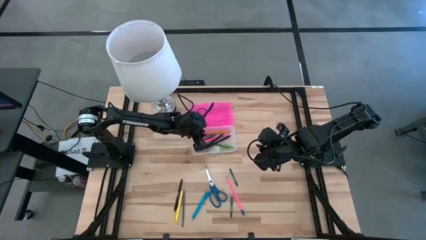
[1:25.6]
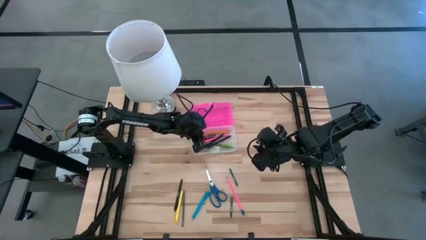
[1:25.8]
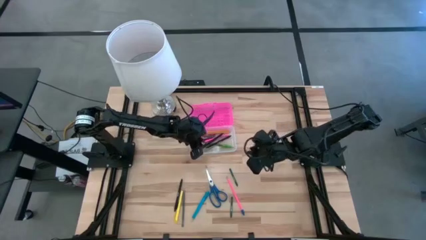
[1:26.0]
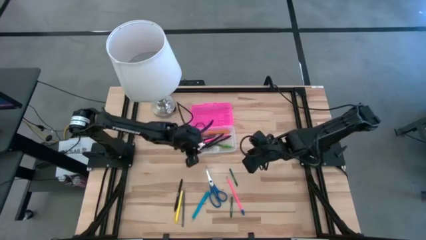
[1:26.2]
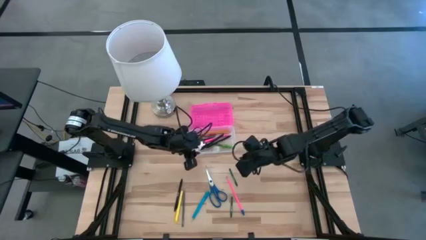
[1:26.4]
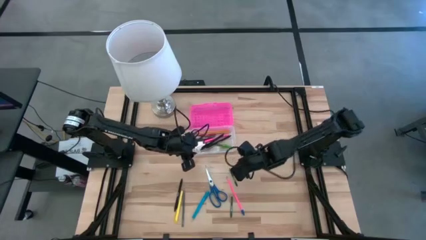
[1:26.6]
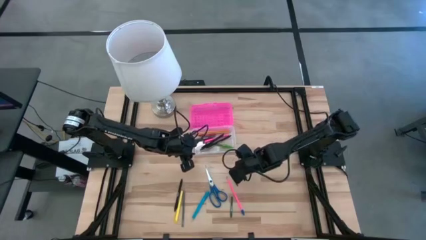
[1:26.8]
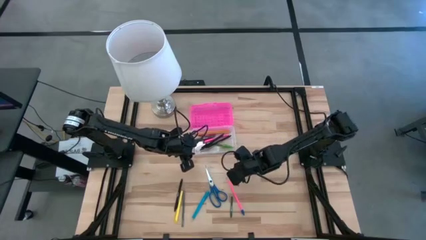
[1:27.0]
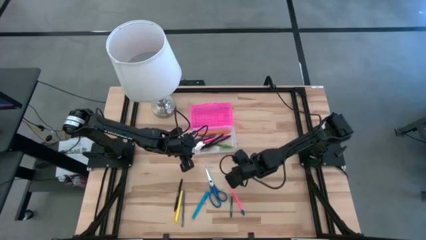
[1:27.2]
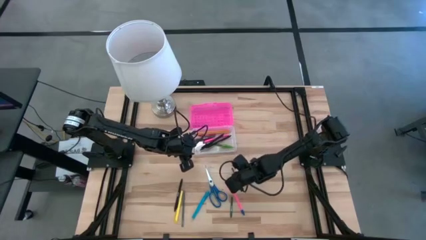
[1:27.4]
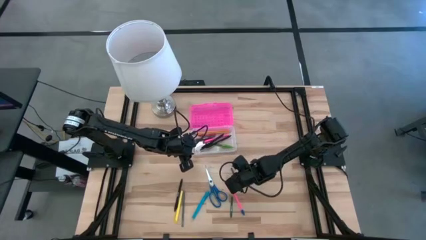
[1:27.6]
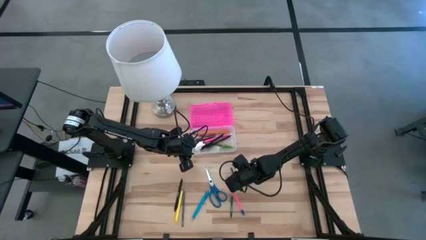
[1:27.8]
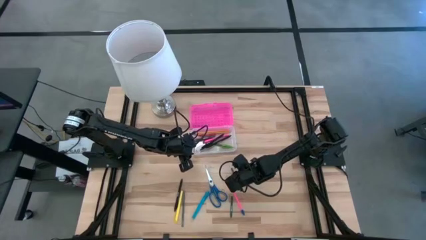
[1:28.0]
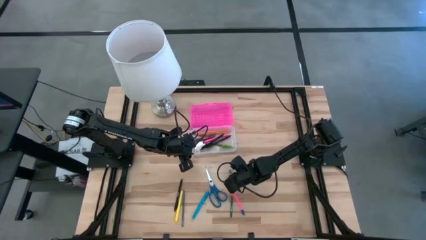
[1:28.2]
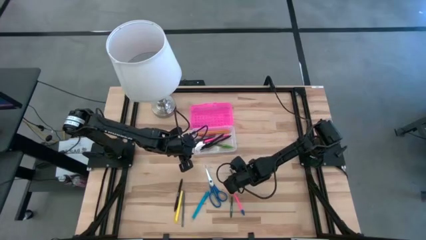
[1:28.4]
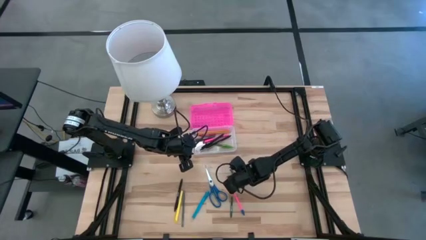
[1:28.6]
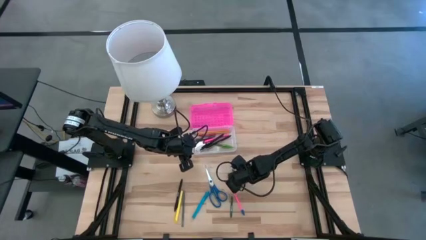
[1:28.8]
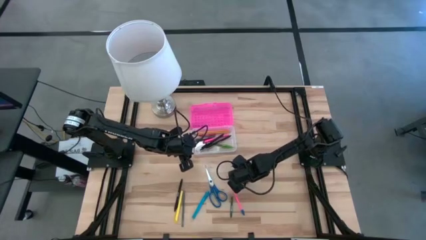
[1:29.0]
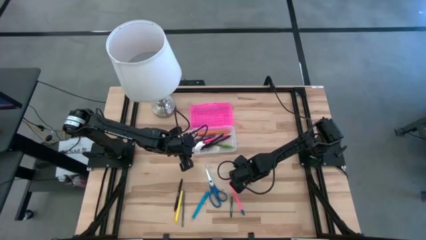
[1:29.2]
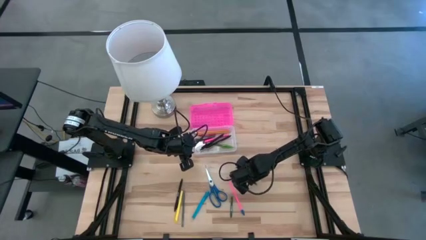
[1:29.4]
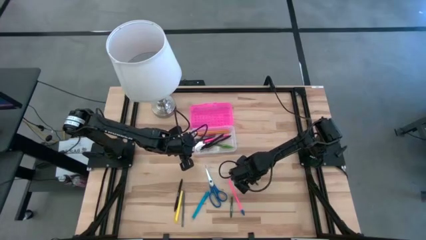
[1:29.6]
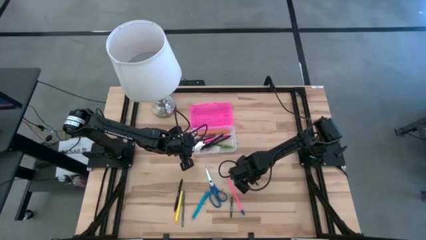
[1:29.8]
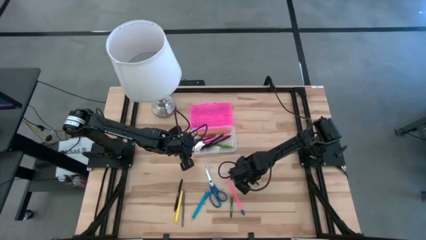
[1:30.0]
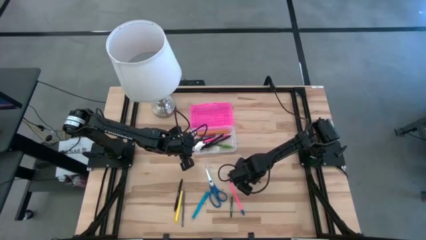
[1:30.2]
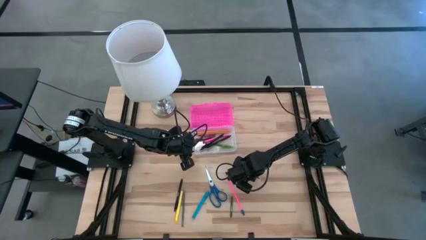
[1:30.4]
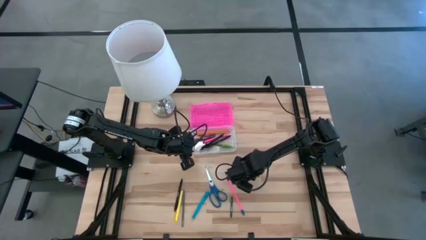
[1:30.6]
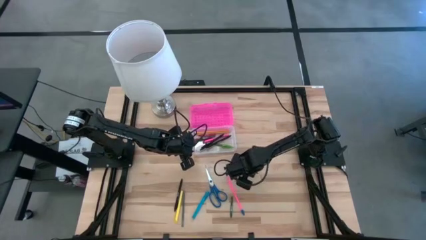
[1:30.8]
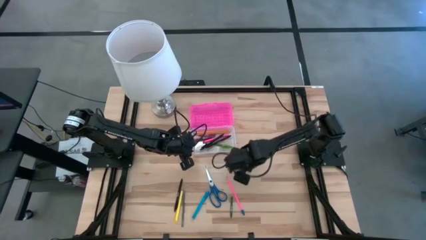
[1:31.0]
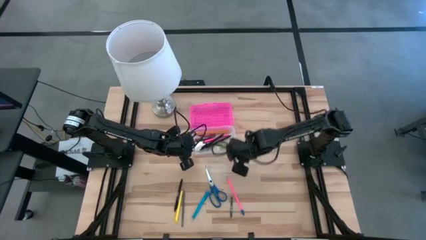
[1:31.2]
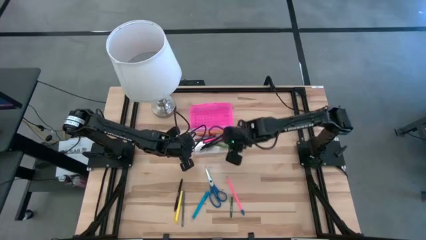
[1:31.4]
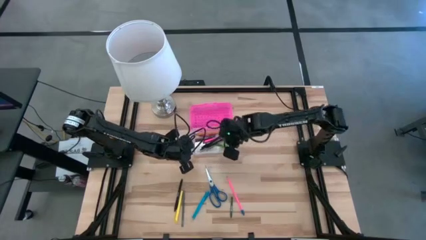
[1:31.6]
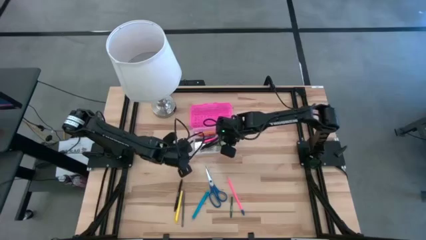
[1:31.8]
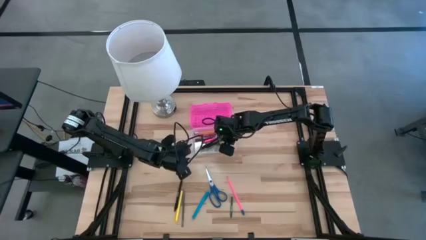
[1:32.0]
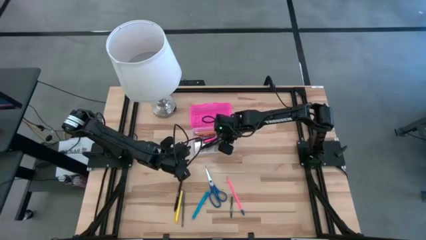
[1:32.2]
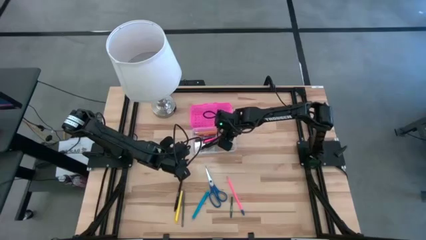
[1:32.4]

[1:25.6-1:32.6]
Task: Pick & place school supplies into a supply box
Put the top green crayon into the supply box

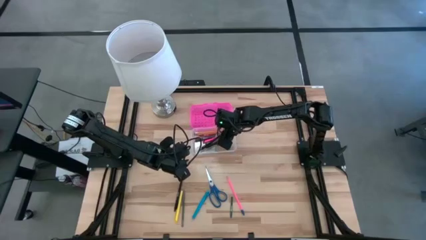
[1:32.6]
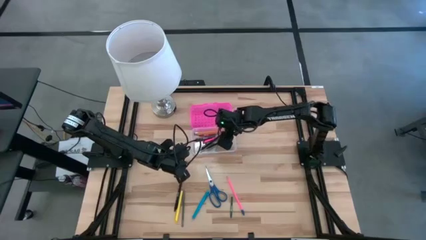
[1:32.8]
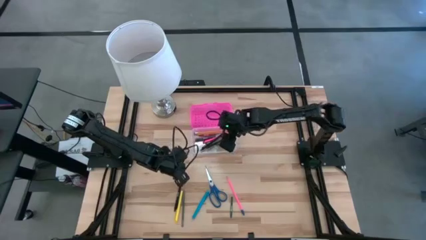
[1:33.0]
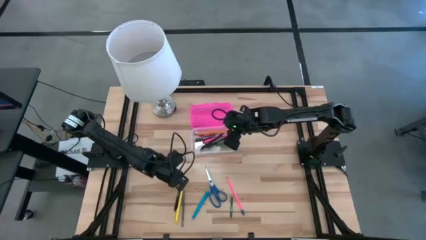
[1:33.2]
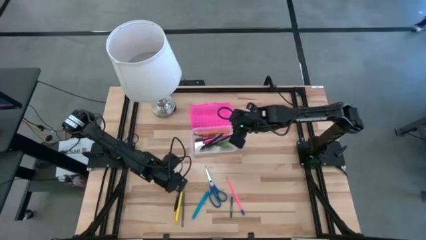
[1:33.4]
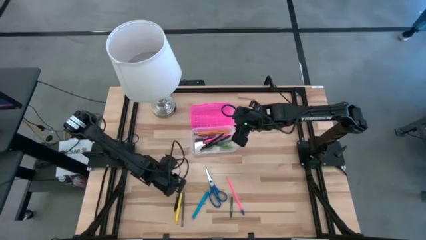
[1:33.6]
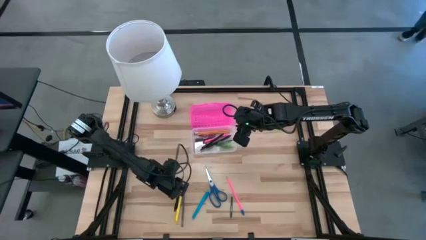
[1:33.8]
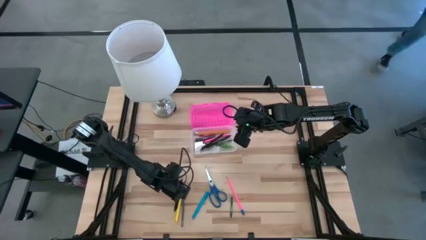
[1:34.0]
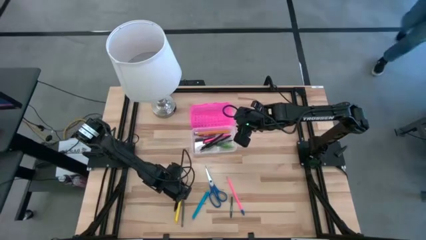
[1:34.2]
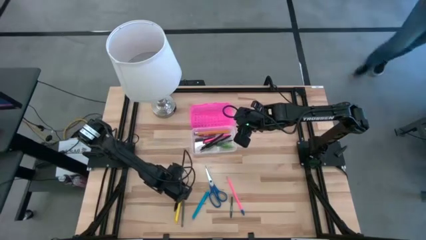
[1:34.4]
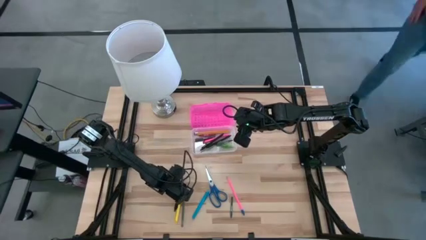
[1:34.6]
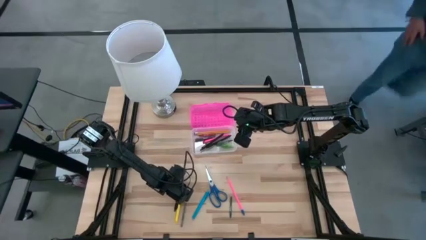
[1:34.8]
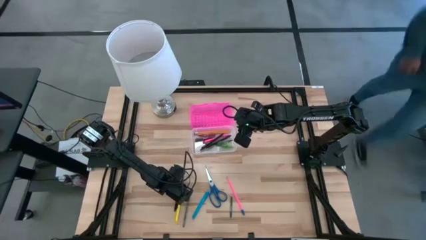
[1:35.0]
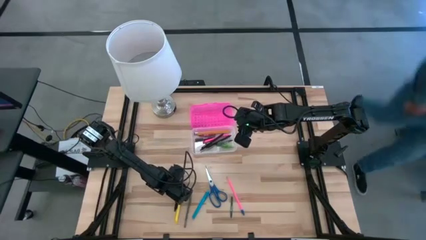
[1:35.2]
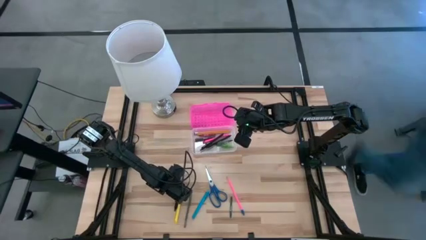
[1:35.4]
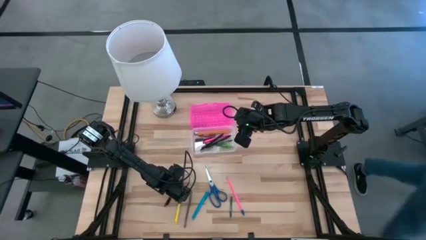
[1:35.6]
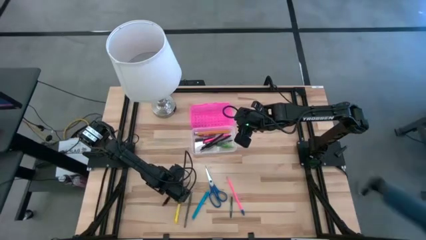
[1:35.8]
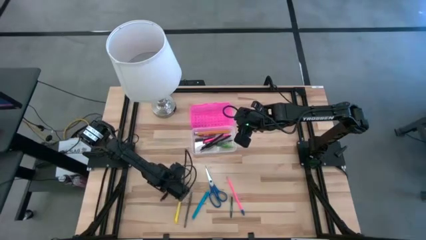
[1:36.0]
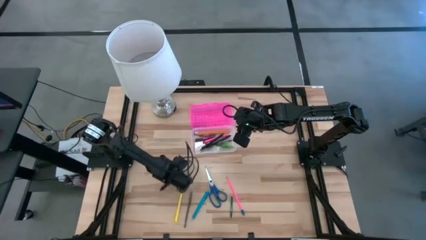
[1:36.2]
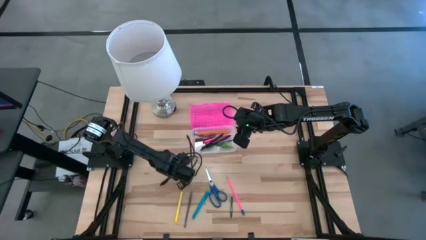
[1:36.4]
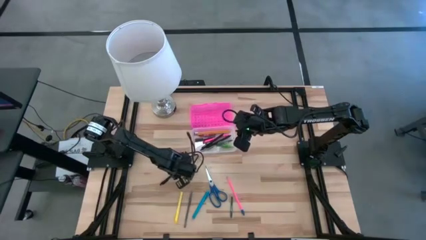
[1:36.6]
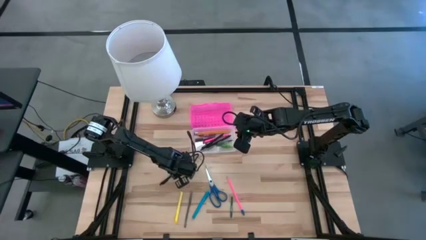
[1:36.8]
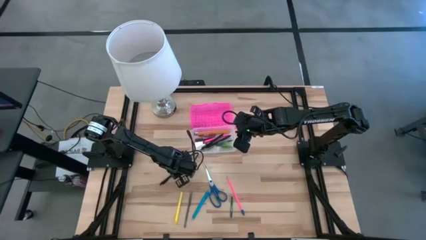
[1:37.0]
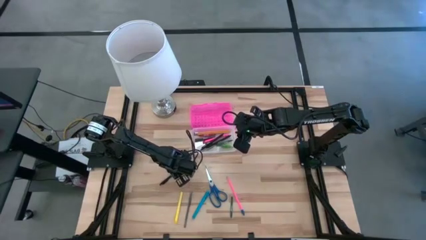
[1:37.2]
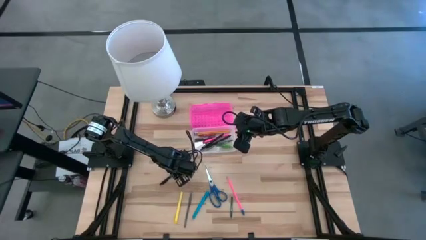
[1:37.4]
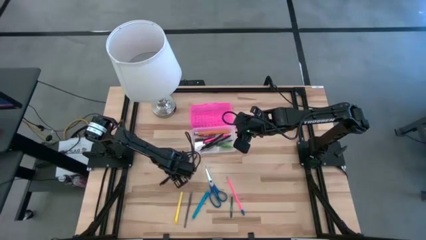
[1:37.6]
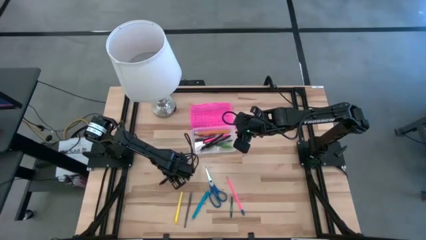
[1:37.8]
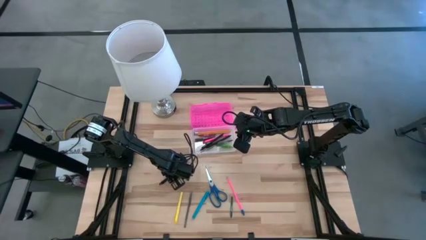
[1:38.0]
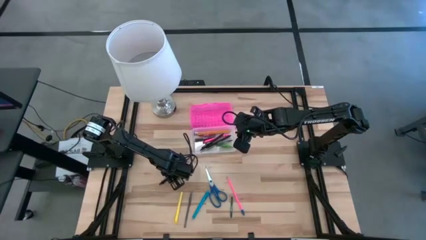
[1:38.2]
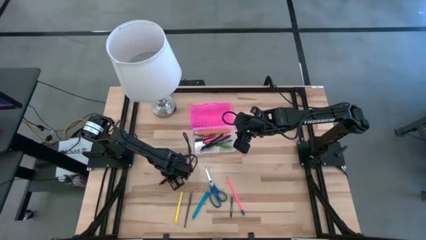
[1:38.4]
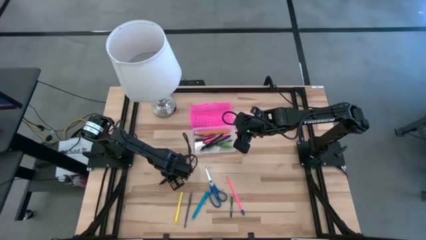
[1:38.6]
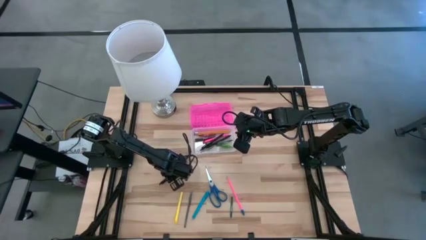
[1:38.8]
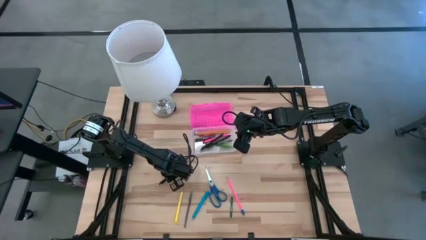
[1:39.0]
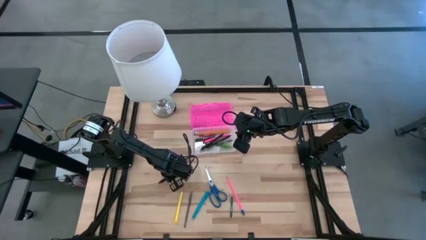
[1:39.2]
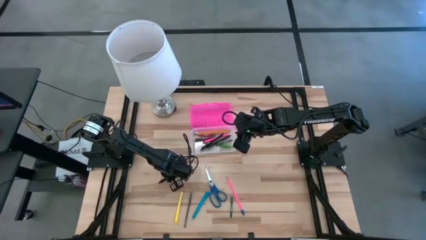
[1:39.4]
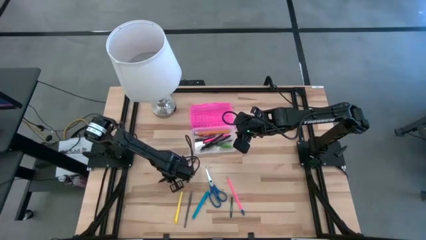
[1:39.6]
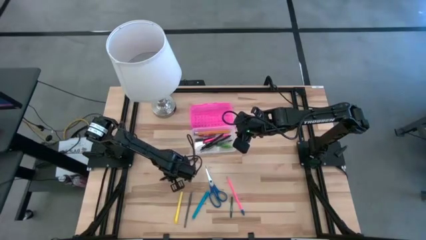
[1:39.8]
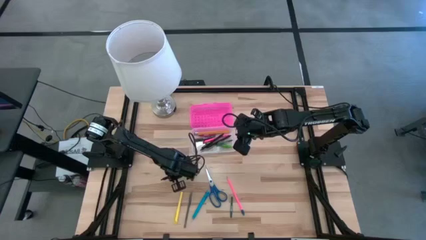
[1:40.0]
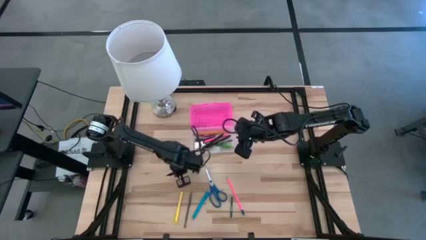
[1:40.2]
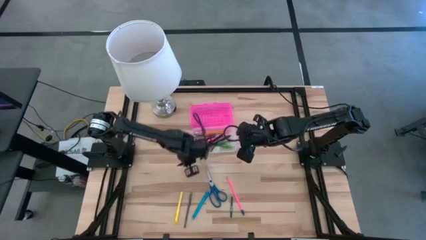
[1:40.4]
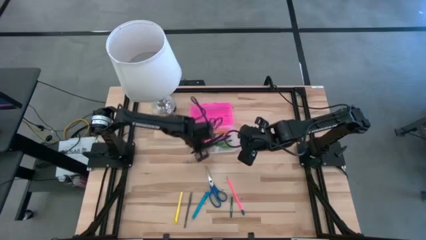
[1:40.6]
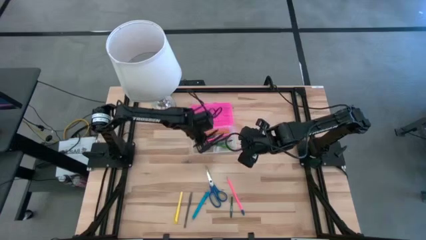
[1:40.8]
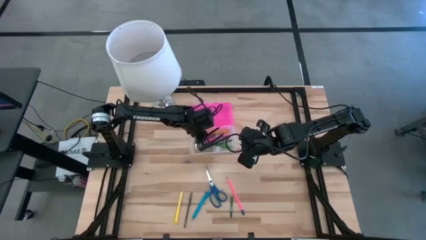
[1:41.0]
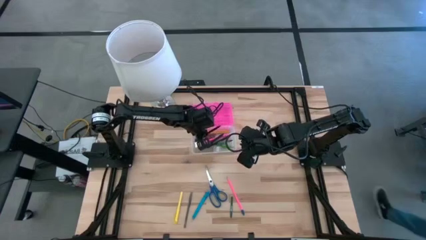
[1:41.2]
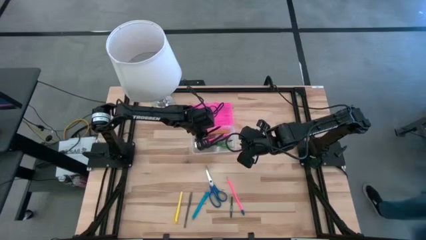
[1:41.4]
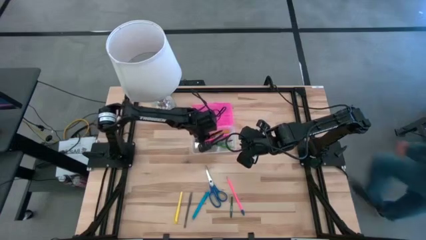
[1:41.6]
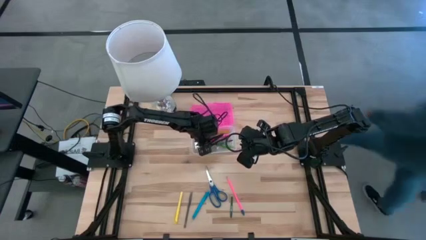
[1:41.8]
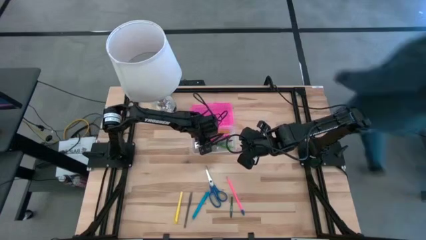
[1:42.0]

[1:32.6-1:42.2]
Put the black pen into the supply box

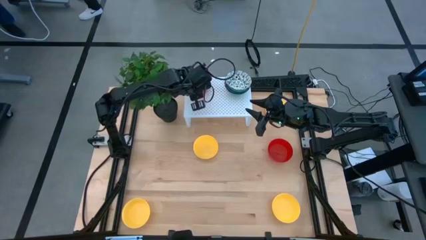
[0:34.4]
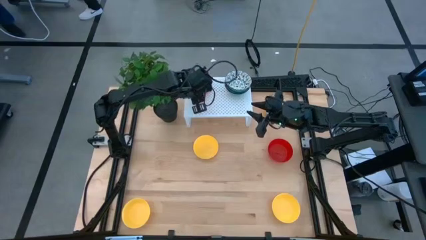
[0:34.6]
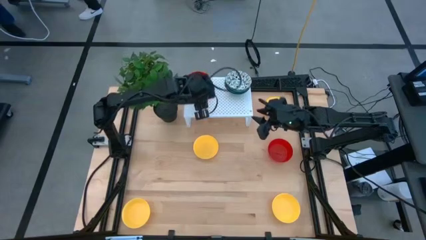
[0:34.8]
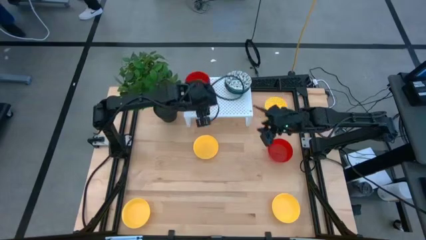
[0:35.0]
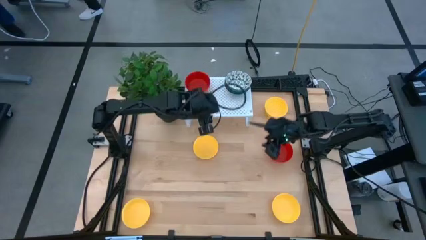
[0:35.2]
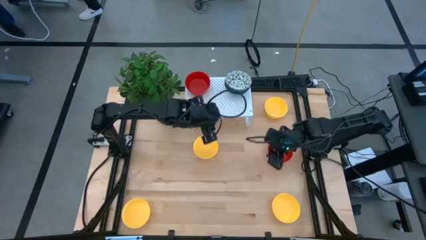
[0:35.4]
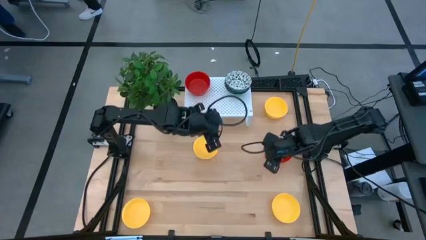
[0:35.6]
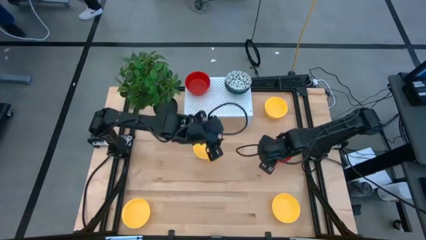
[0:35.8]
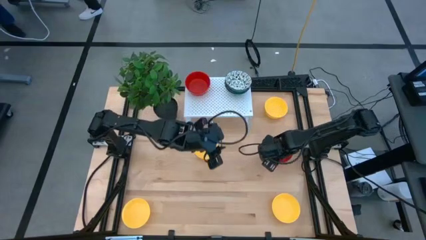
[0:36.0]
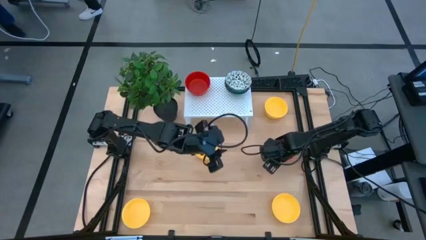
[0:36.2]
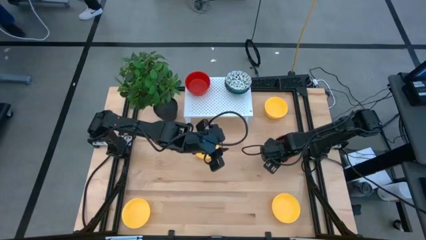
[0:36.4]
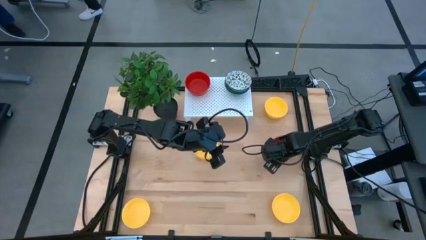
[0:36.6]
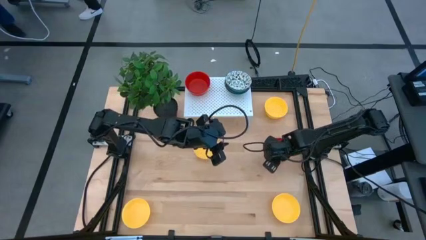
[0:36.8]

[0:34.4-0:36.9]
Task: Pick & Place Mini bowls
Stack the red bowl on the red bowl on the shelf
